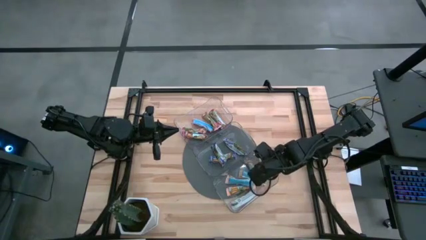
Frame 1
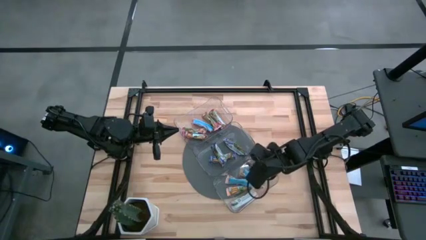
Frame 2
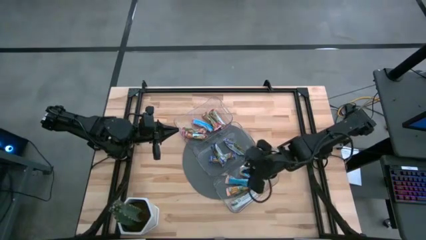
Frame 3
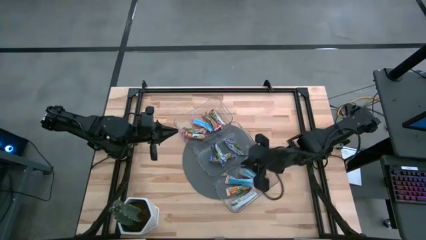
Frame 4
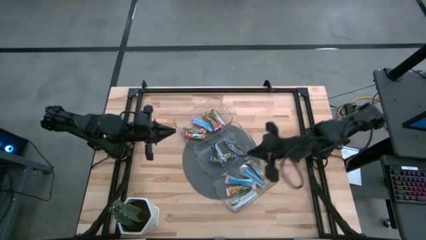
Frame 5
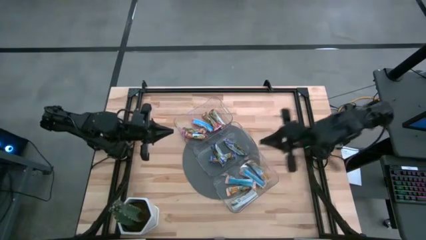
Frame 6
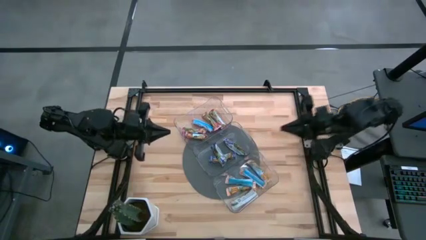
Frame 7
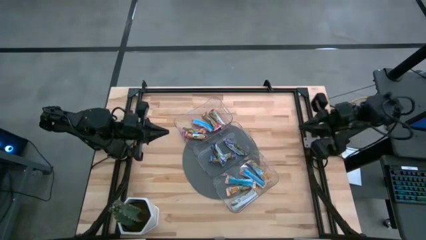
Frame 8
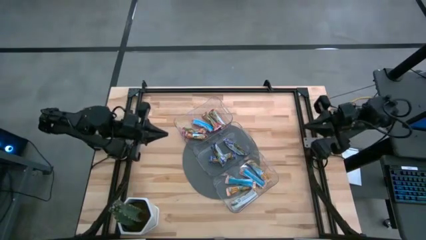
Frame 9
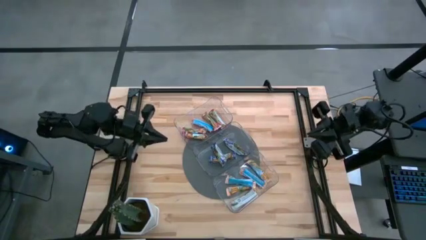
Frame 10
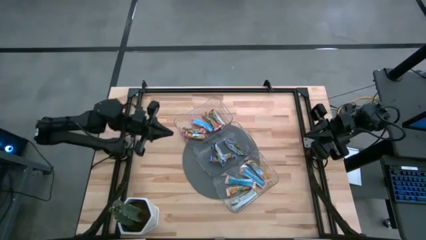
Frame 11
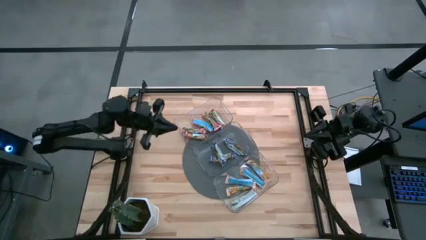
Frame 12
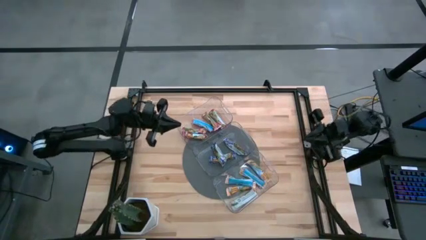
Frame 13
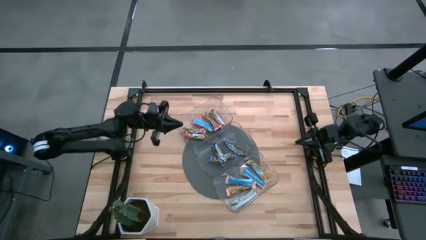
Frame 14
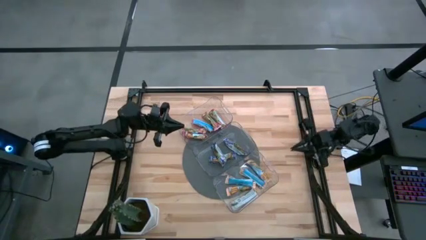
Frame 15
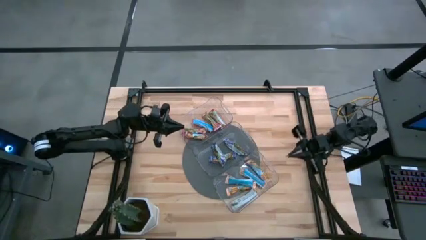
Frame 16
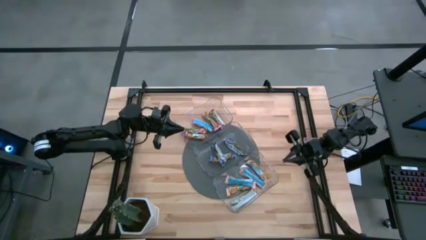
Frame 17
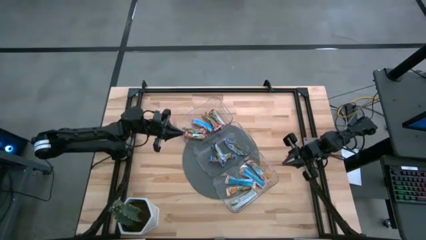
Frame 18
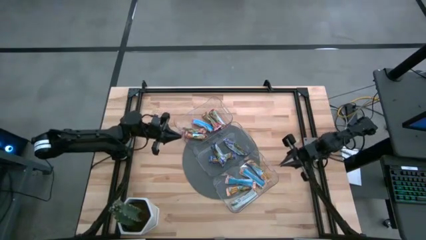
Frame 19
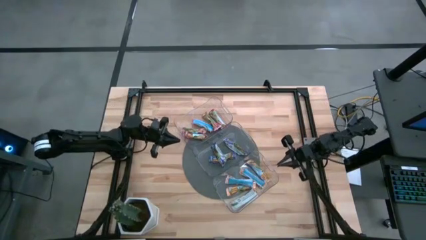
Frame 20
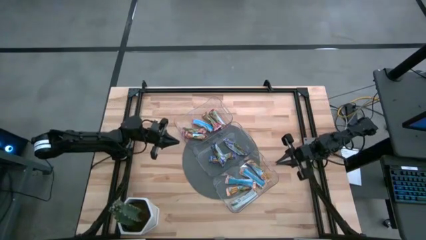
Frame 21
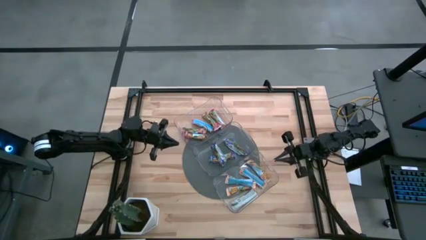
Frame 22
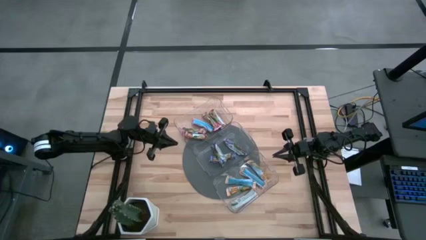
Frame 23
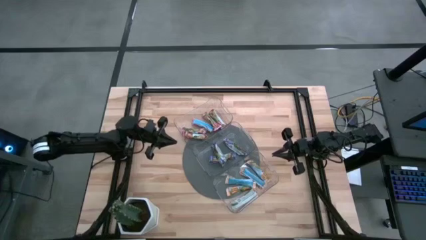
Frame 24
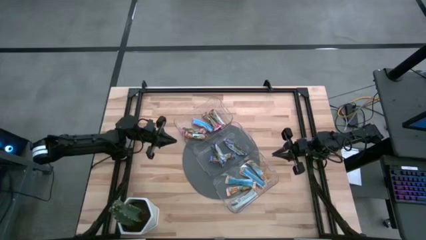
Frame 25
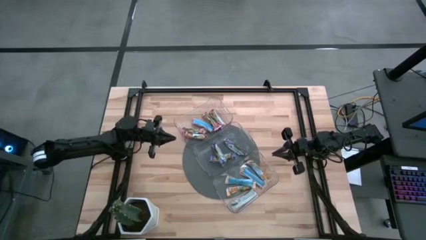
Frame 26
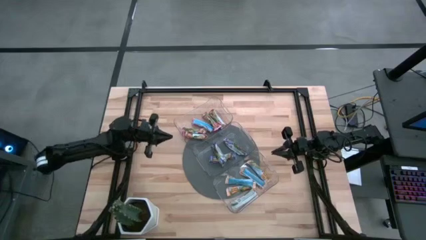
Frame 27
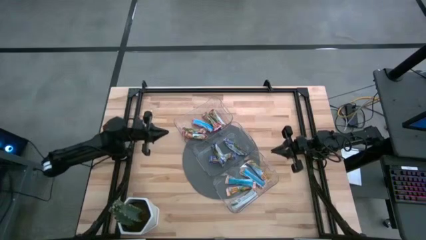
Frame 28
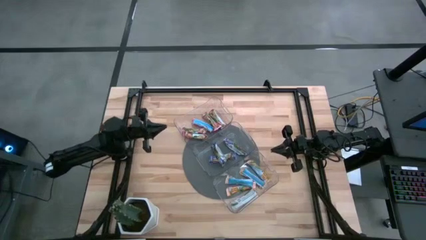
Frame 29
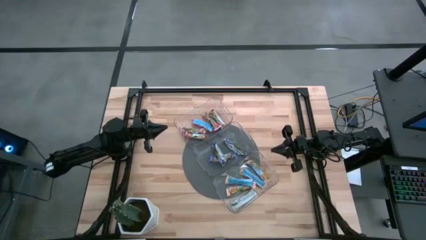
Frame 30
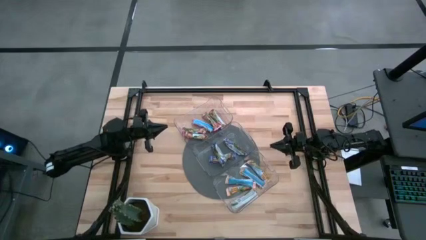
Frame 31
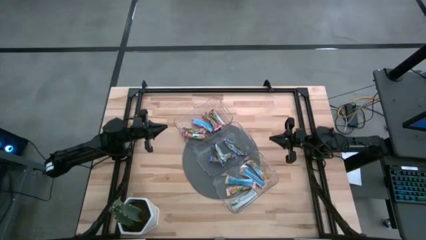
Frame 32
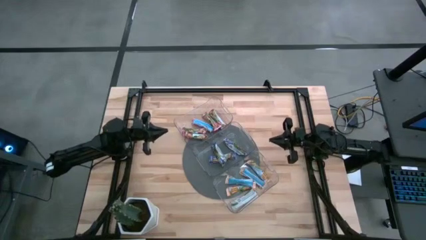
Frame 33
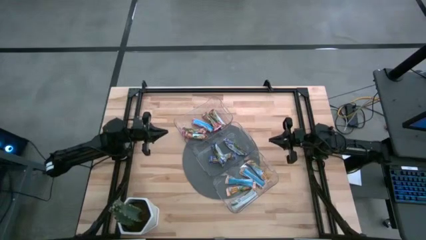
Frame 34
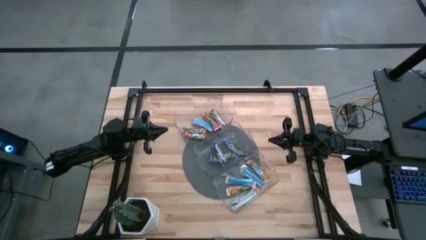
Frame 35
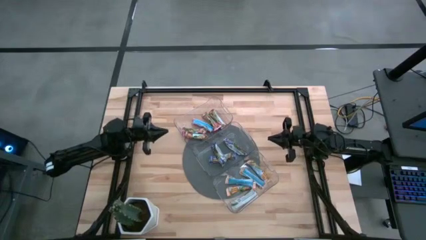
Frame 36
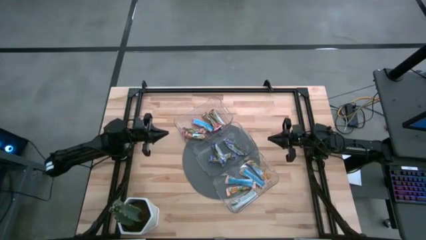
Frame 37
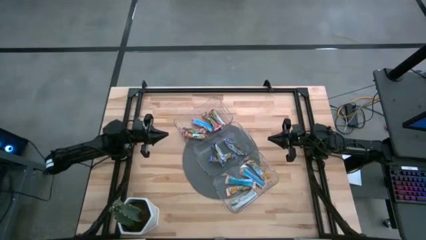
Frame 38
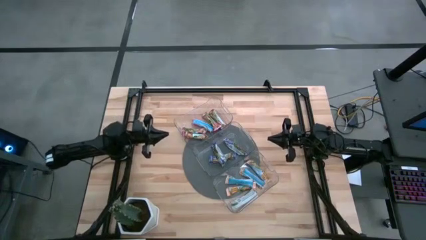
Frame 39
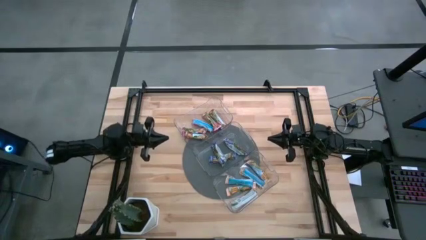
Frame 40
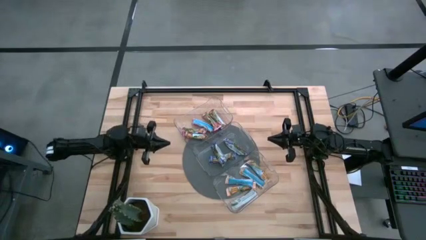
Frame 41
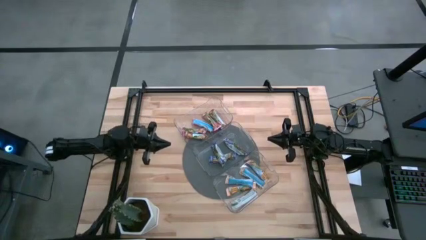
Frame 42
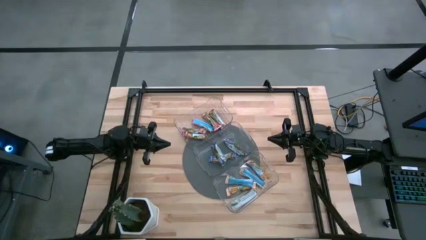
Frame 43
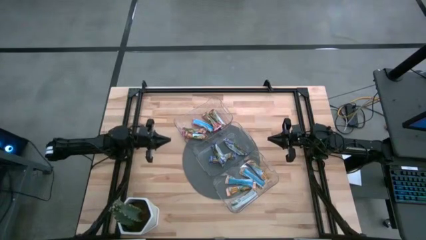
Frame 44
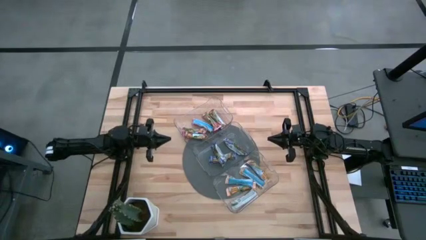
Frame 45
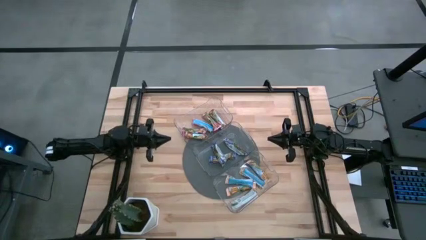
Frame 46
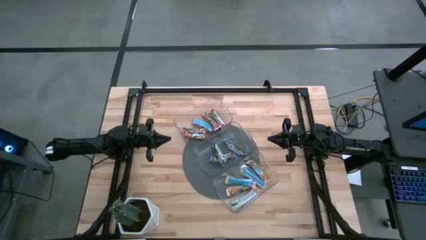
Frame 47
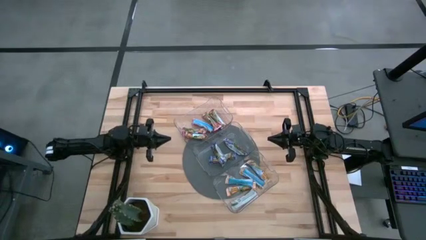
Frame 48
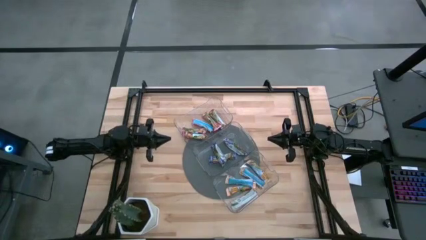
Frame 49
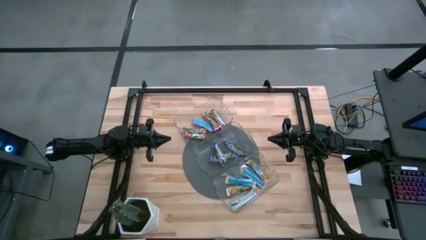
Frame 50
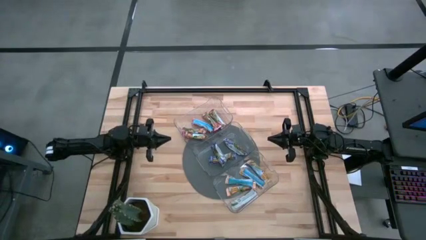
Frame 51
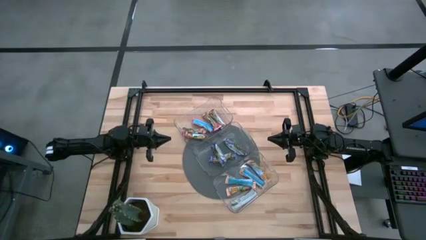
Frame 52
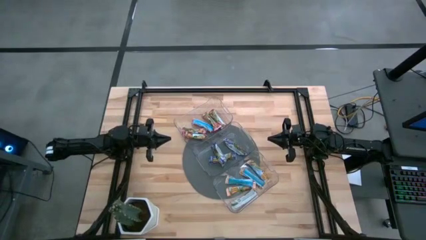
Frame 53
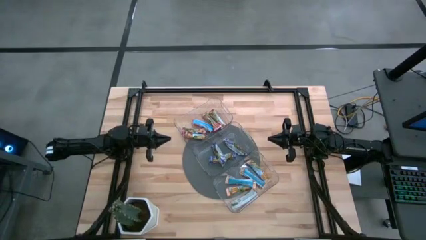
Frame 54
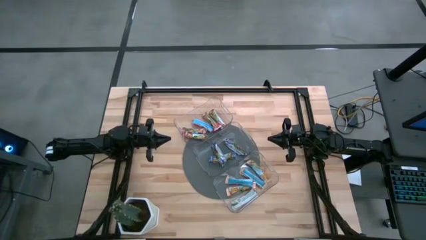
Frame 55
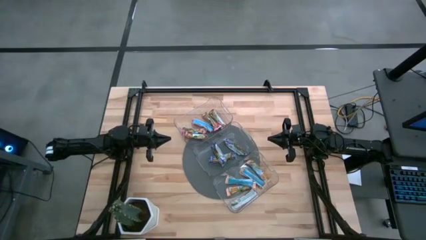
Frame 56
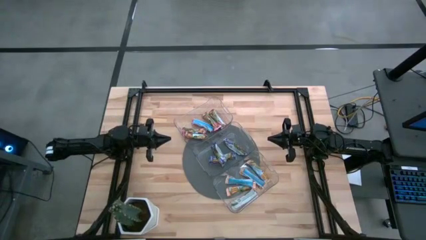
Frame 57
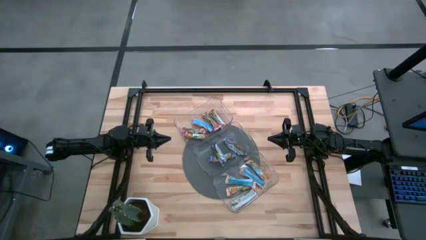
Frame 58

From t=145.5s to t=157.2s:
Task: Pick and place Granola Bars by type
Return to Home Position
